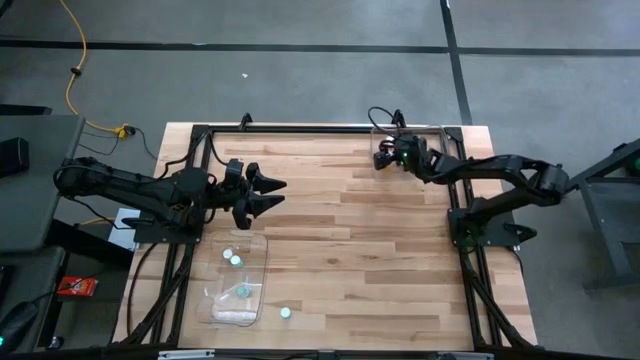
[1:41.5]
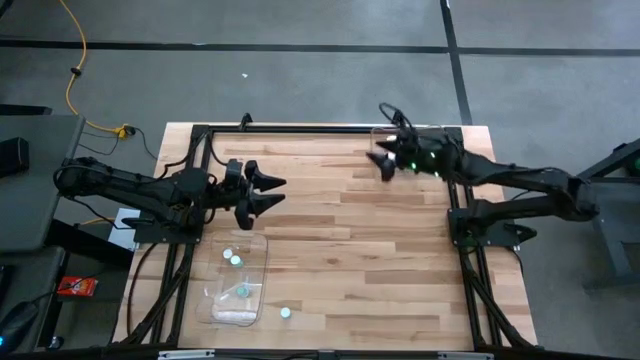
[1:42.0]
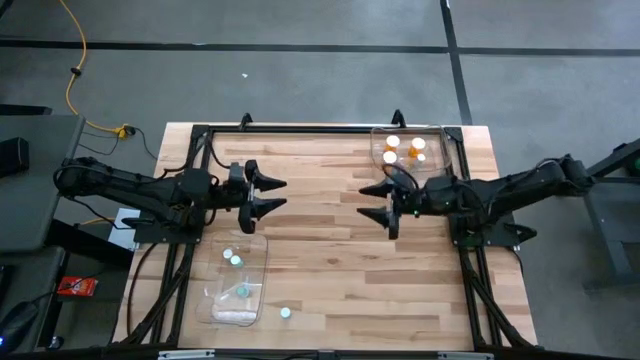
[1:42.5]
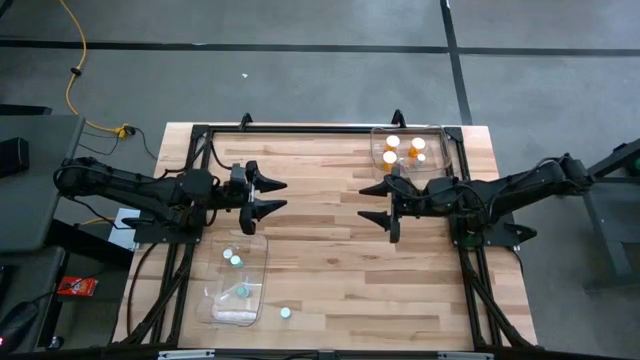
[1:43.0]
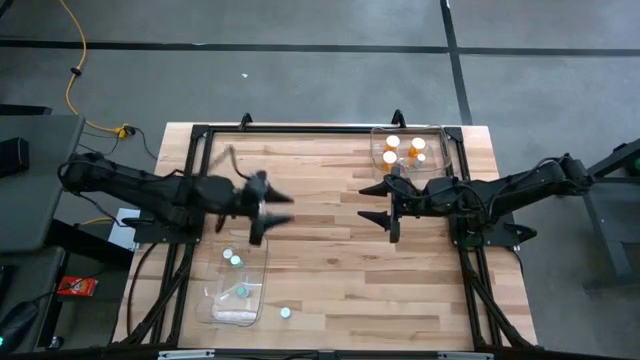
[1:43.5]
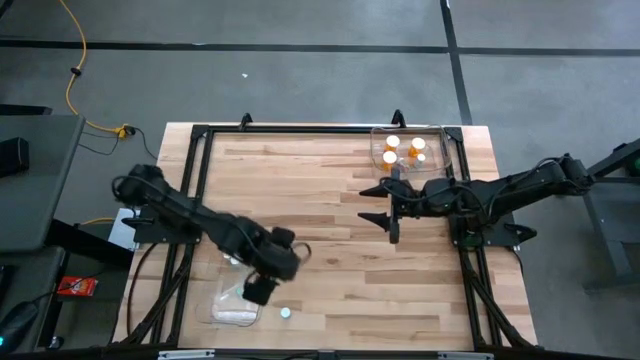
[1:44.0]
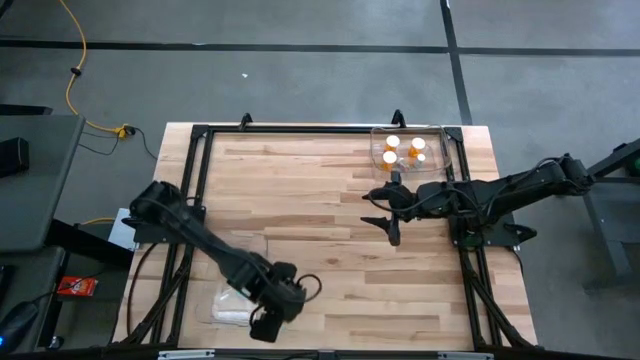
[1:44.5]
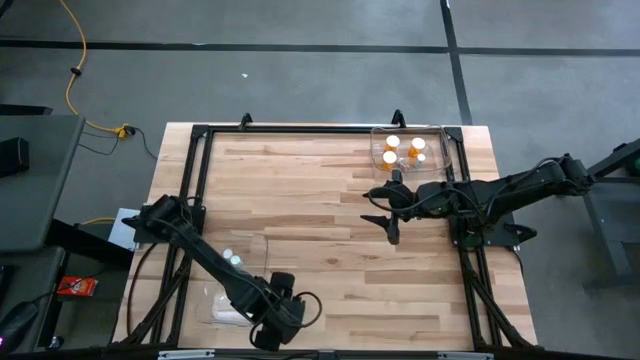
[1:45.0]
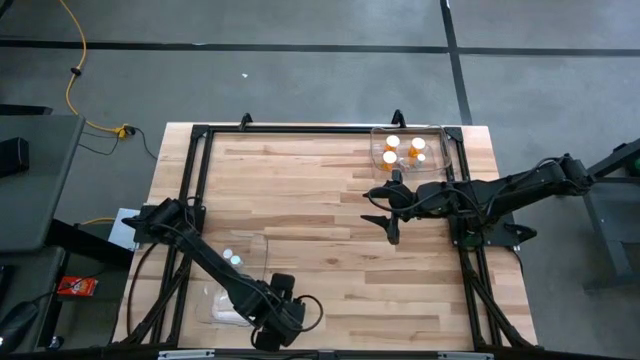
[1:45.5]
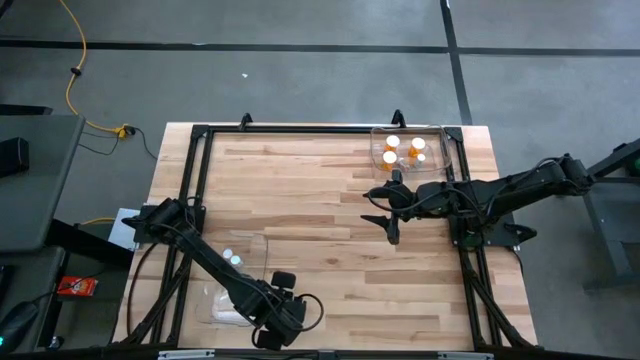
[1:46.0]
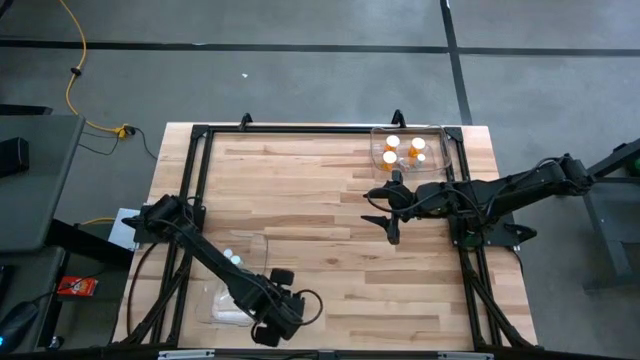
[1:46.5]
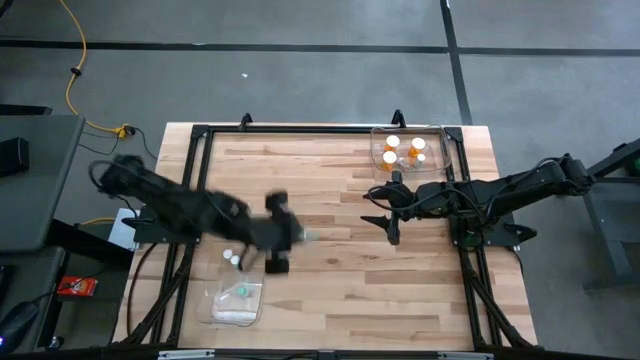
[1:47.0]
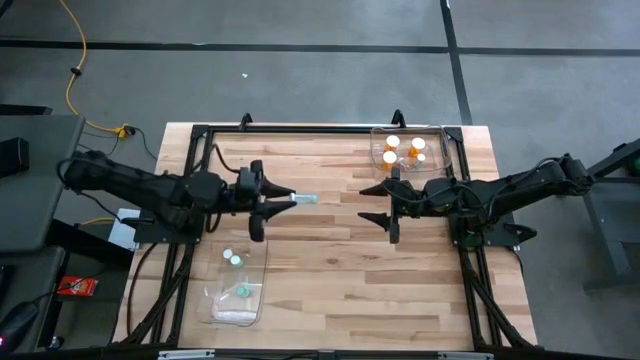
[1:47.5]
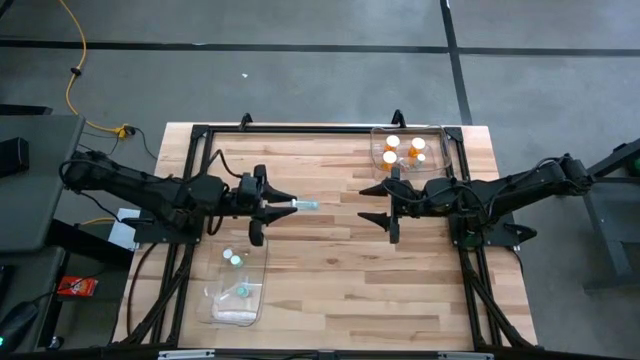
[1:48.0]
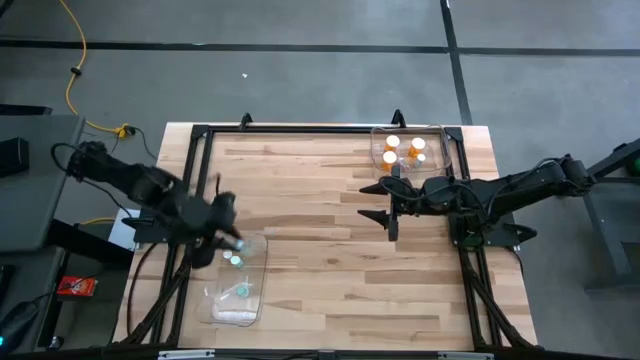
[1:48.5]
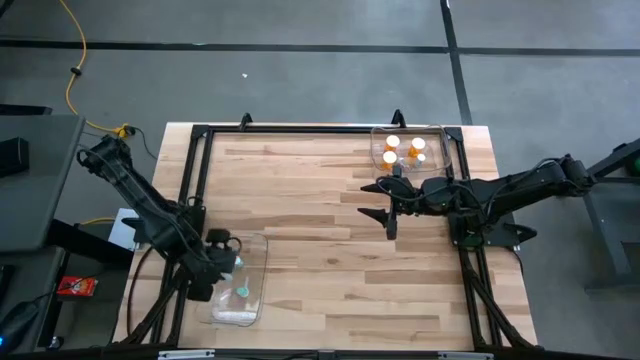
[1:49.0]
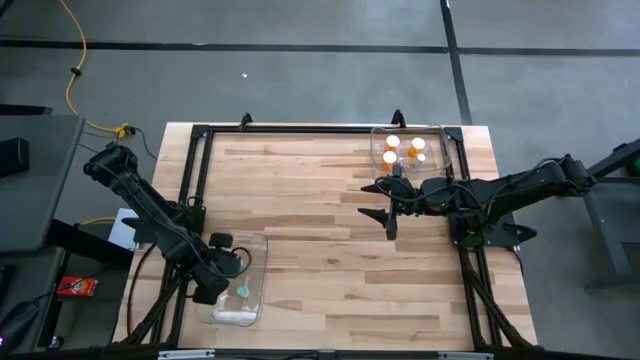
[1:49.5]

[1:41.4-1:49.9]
Task: Pick and place medicine bottles into bin by pill shape (circle, oval)
Put the green tablet bottle into the bottom transparent bin

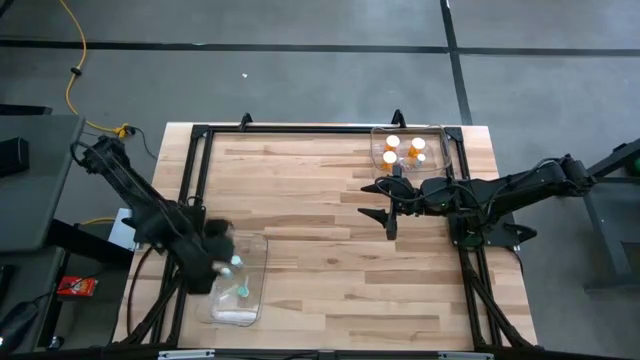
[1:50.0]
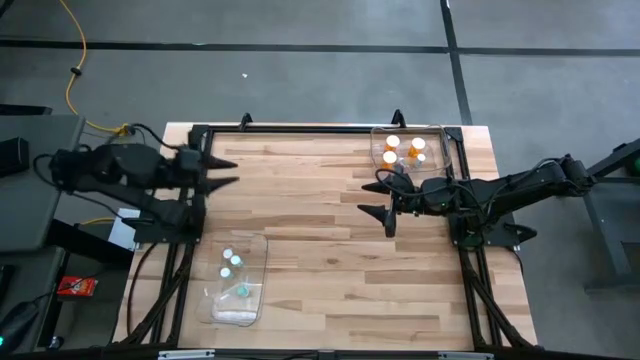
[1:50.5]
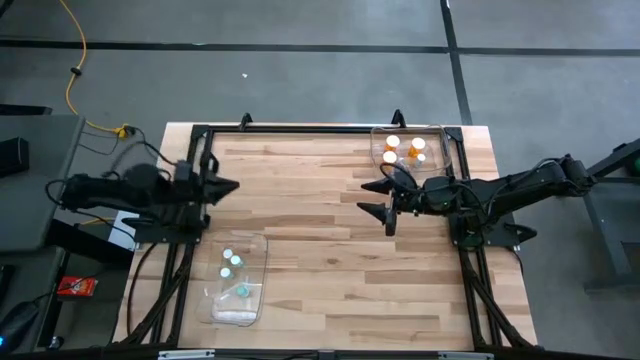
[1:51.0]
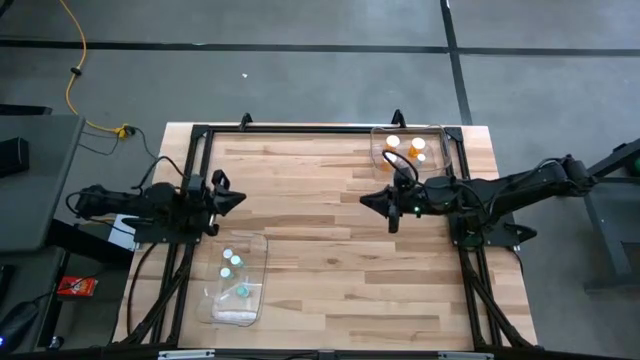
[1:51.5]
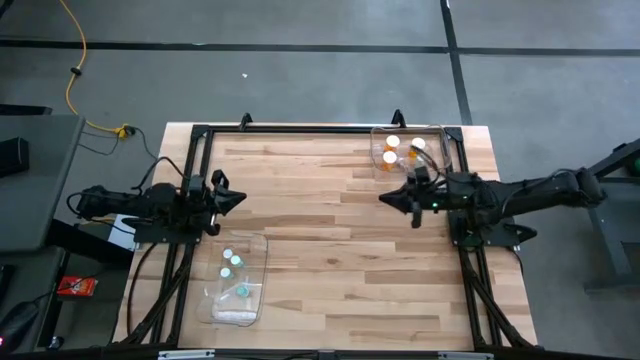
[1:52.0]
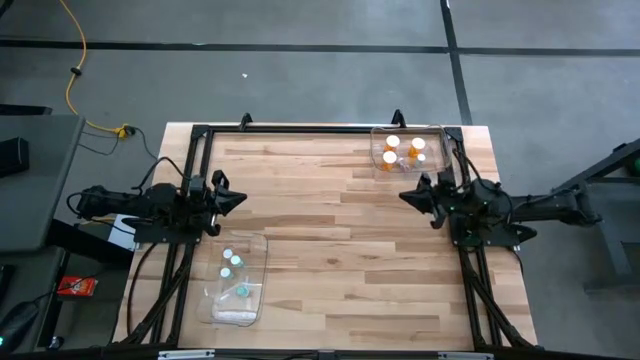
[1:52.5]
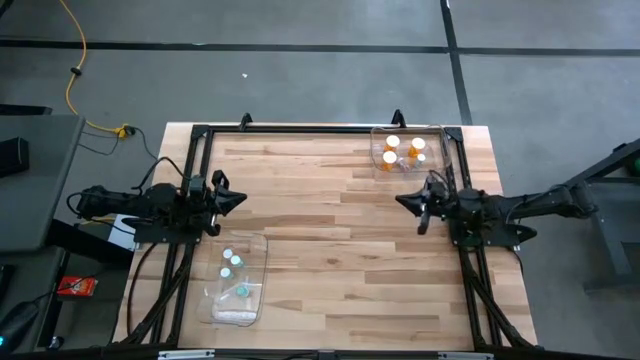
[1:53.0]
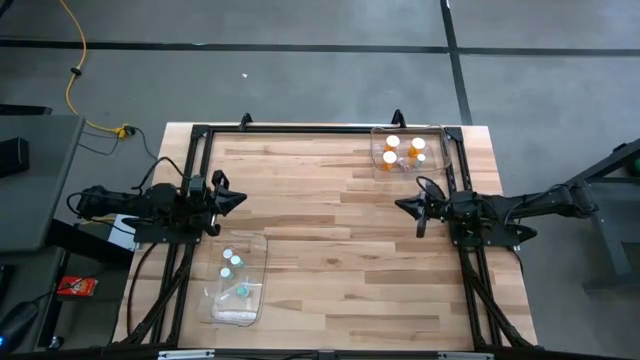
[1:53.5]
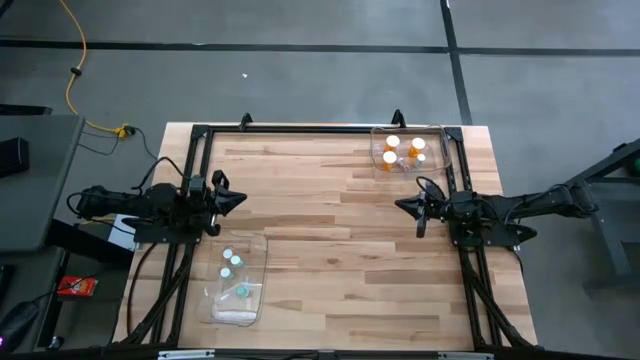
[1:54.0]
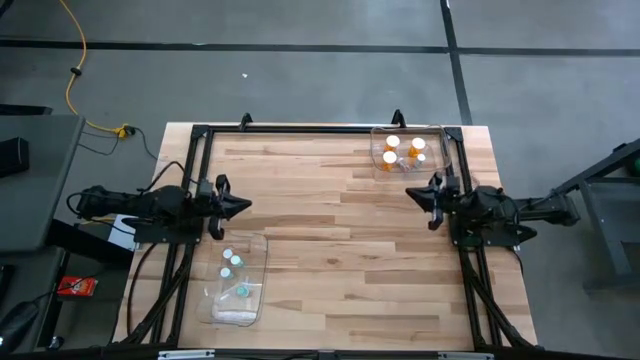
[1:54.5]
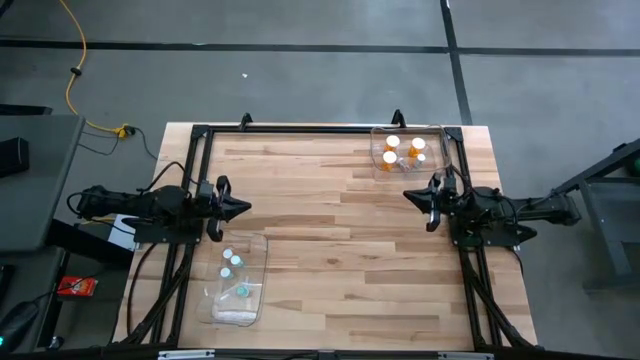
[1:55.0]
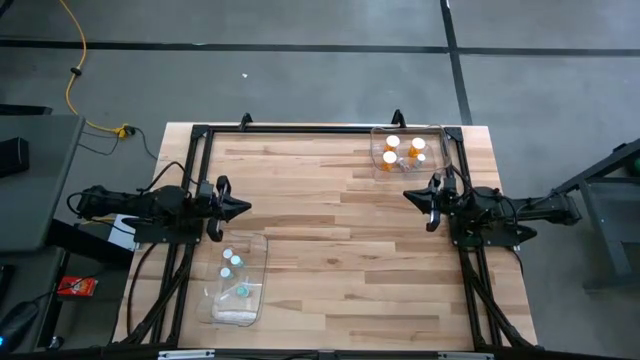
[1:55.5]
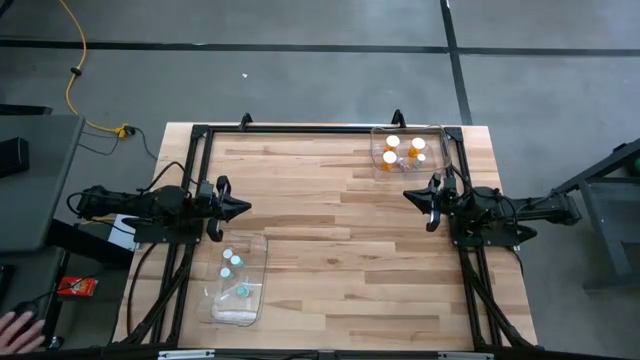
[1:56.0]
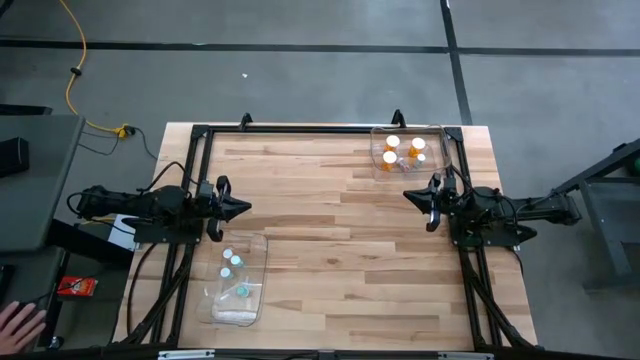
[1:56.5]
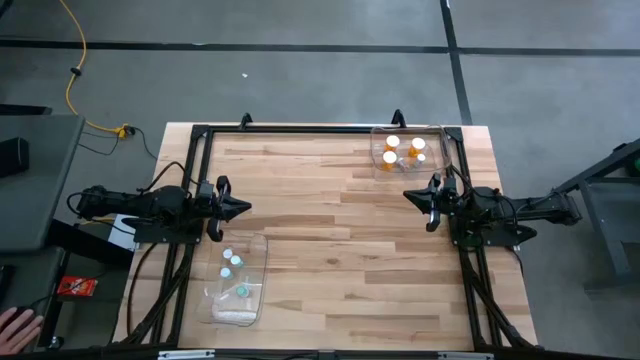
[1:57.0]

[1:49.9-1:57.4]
Return to Home Position

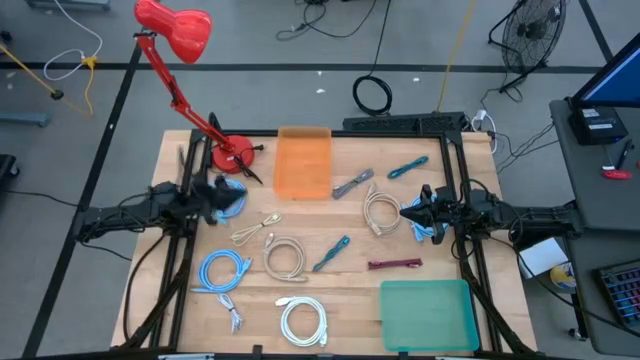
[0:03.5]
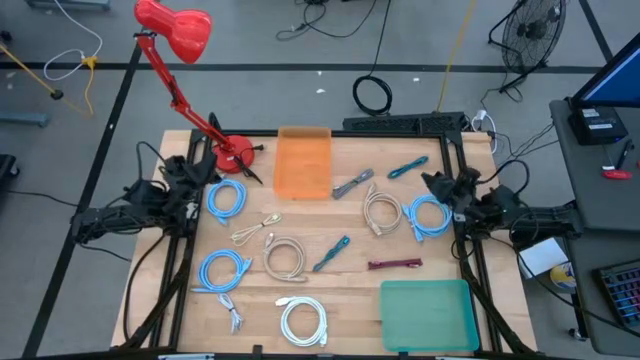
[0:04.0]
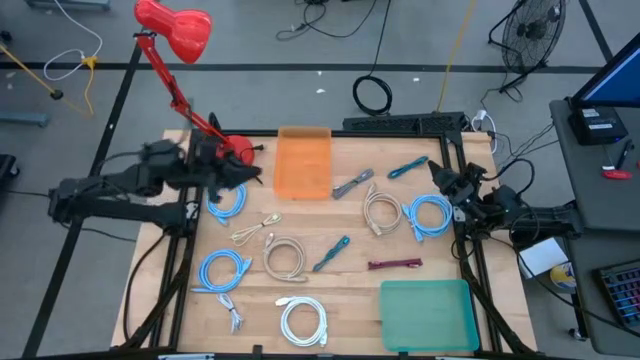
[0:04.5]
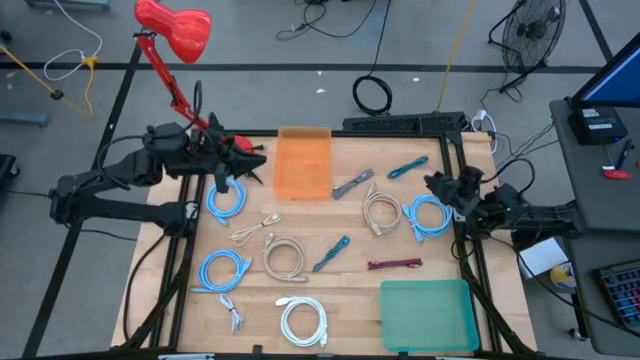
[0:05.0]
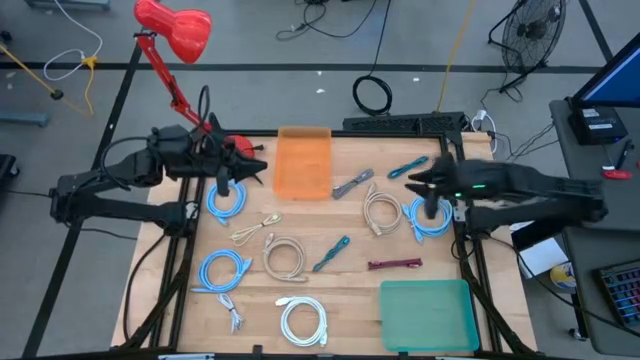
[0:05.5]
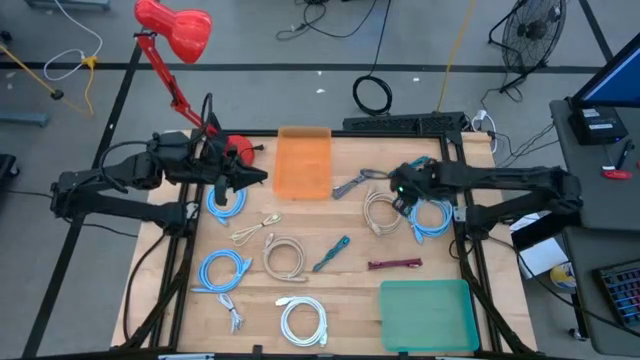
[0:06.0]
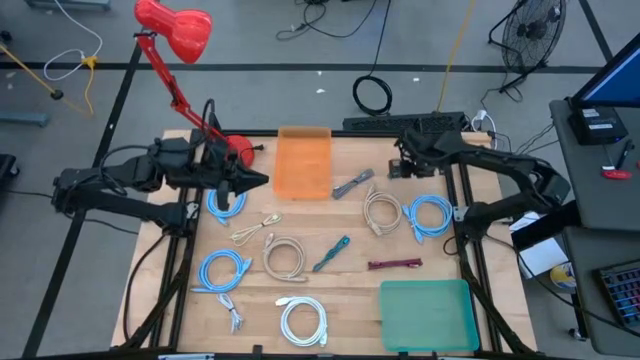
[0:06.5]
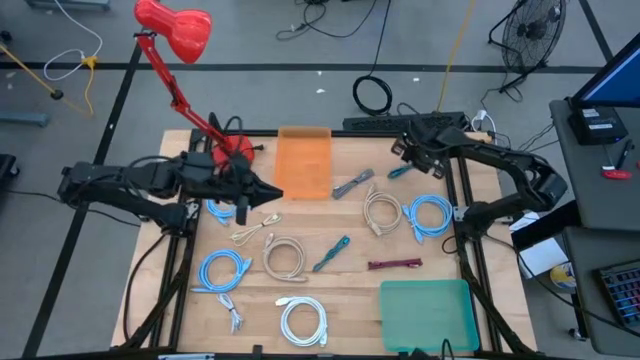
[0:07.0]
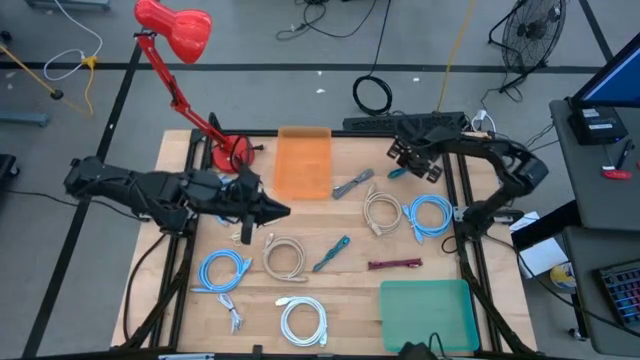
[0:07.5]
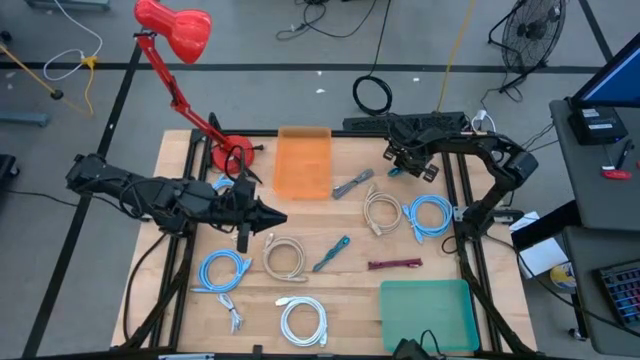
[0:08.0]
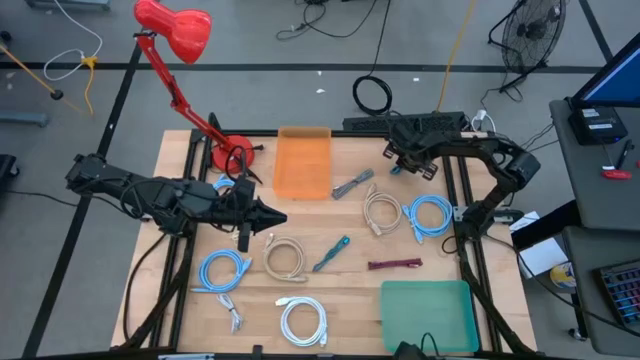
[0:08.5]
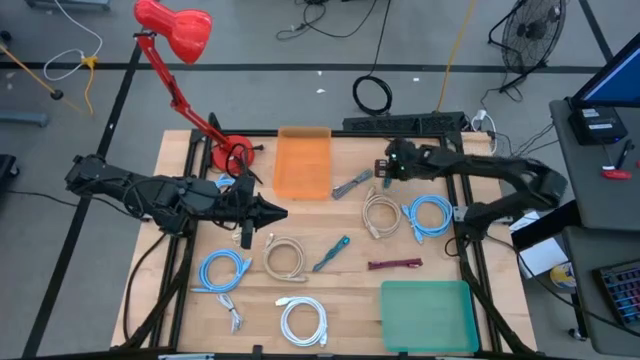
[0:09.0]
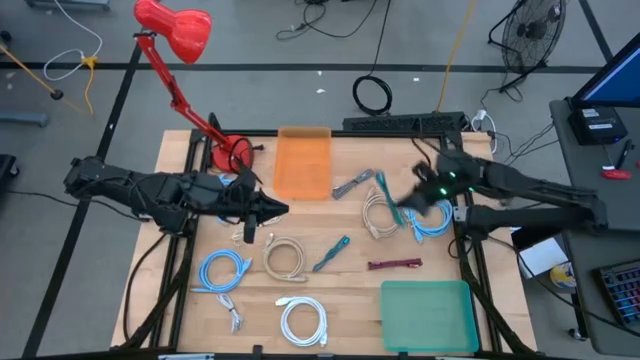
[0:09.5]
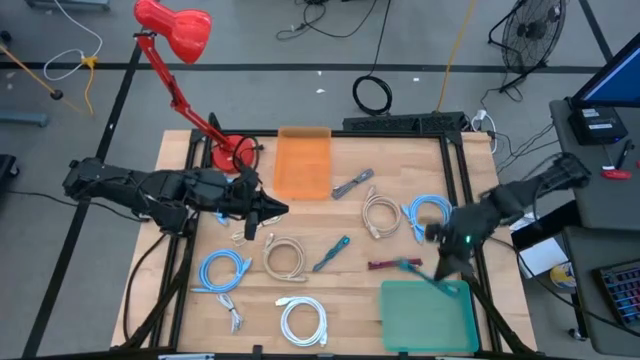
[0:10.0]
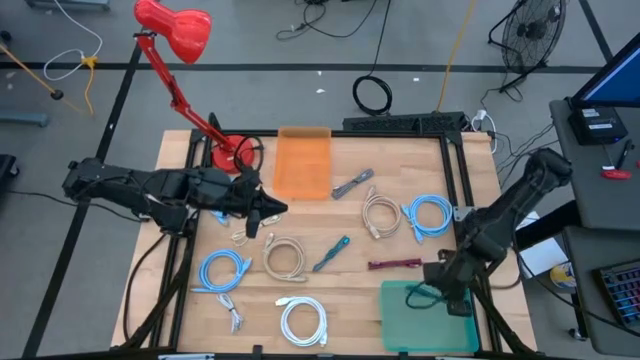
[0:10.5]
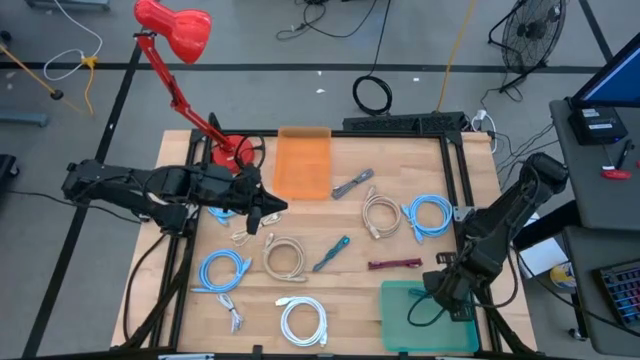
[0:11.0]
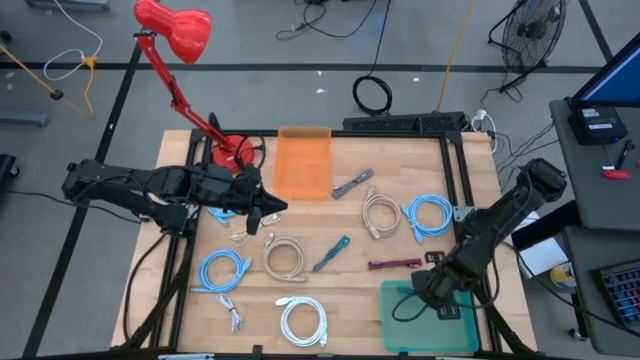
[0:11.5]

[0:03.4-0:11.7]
Task: Pick & Place USB Port
Put the top dark blue charger cable into the green bin
